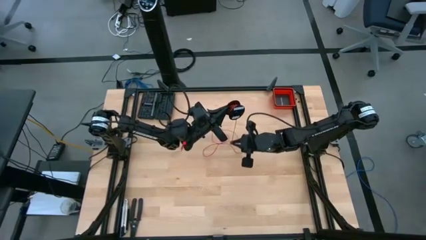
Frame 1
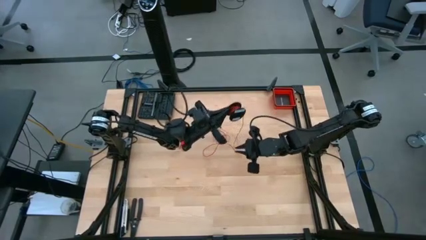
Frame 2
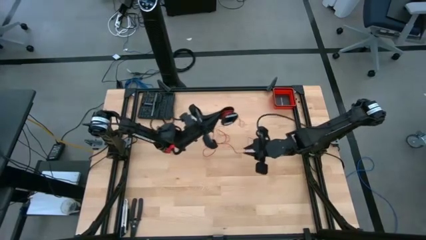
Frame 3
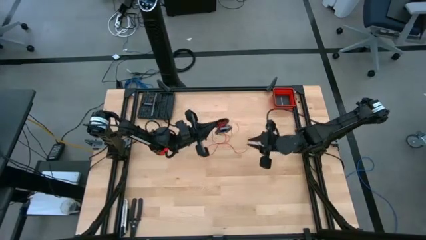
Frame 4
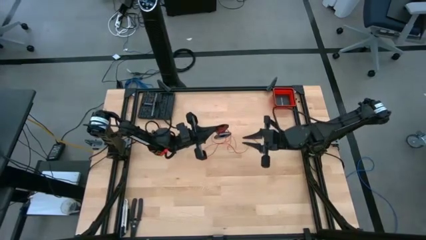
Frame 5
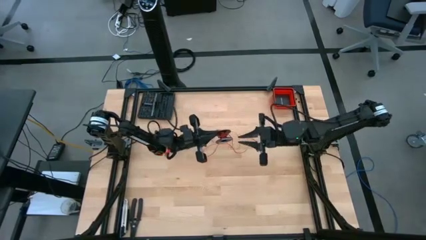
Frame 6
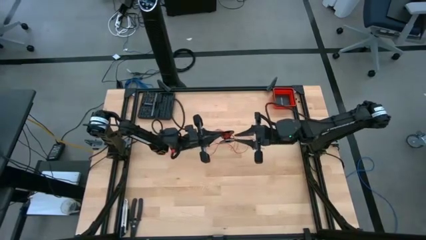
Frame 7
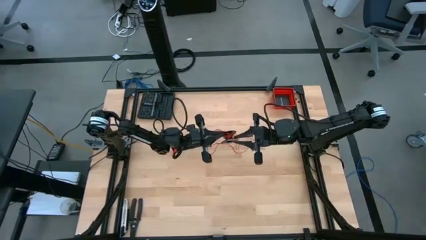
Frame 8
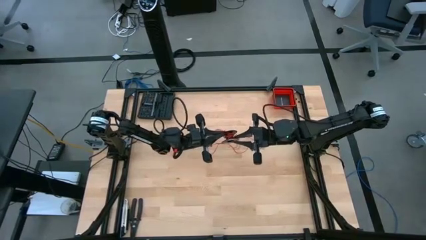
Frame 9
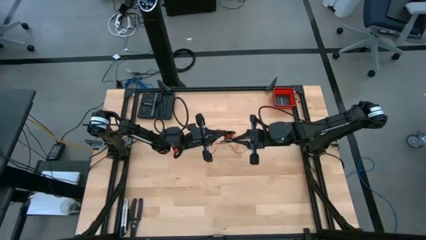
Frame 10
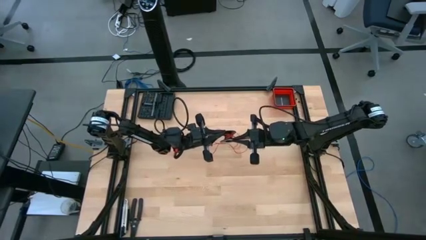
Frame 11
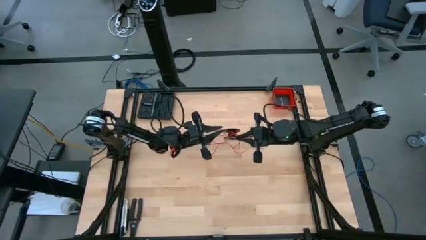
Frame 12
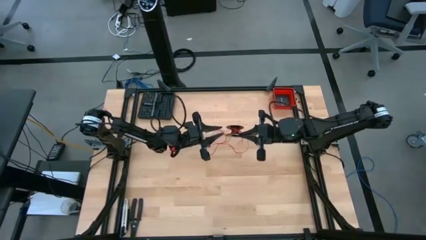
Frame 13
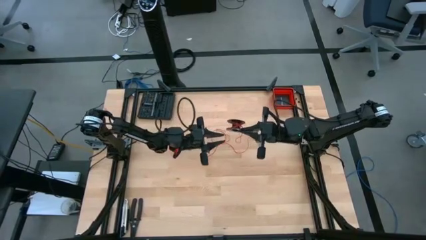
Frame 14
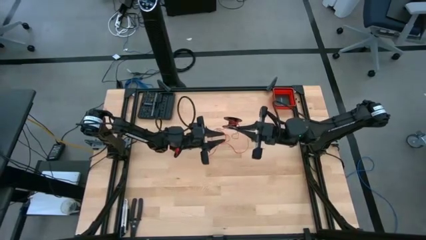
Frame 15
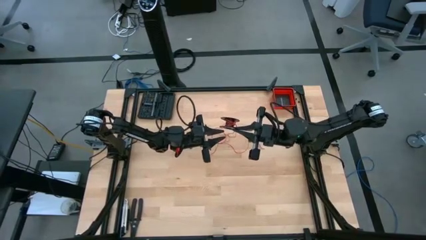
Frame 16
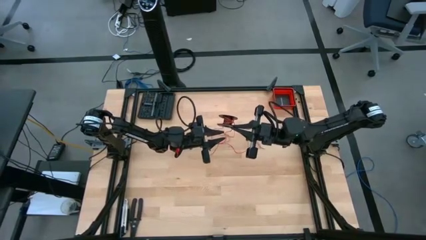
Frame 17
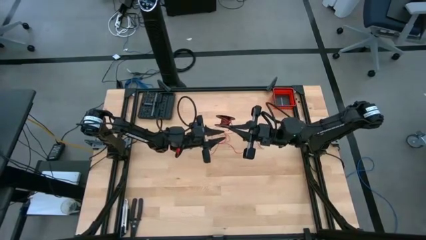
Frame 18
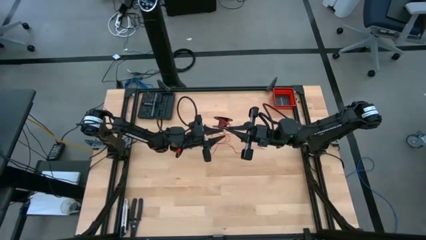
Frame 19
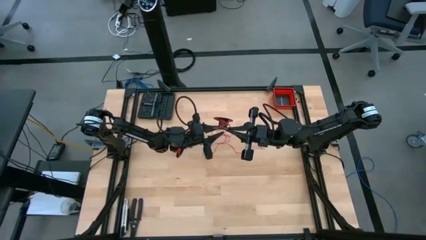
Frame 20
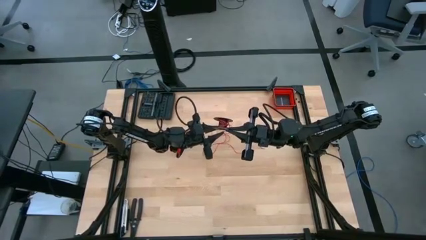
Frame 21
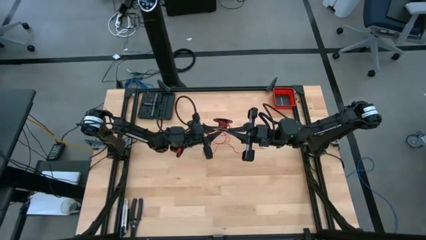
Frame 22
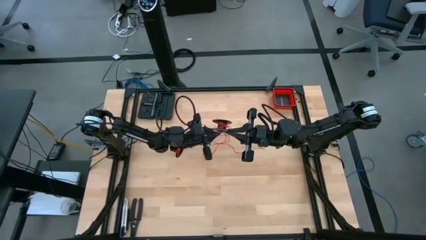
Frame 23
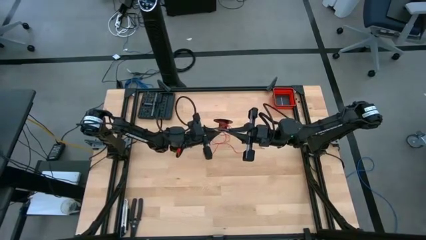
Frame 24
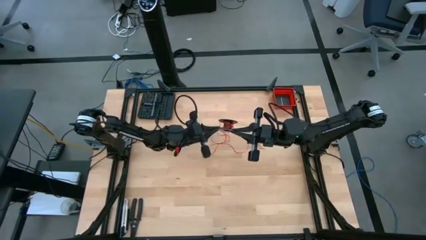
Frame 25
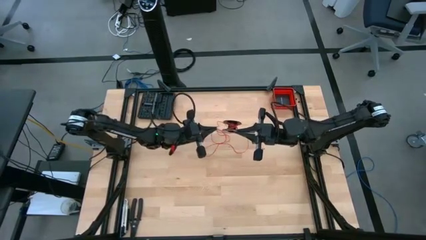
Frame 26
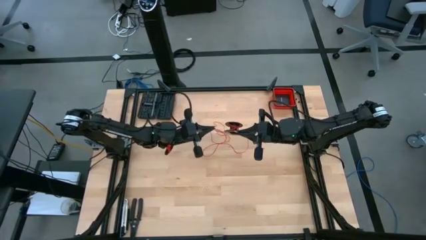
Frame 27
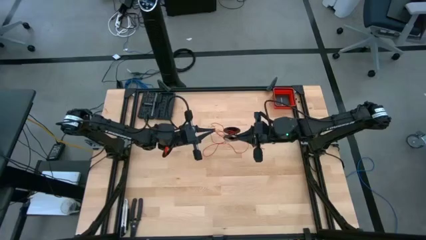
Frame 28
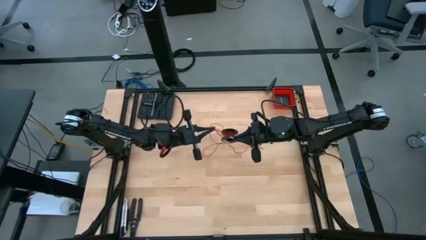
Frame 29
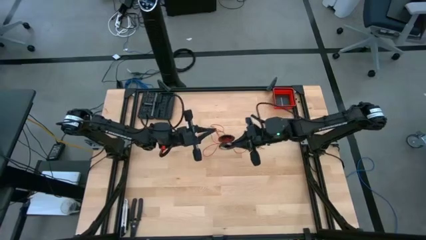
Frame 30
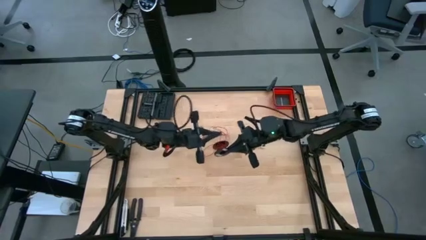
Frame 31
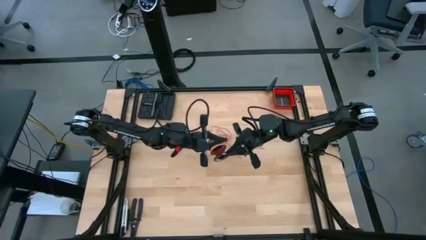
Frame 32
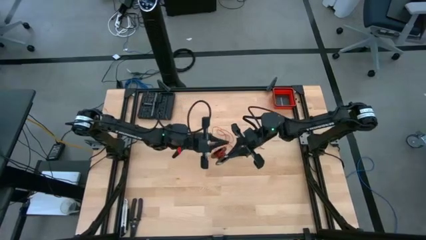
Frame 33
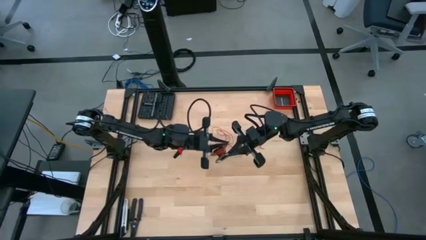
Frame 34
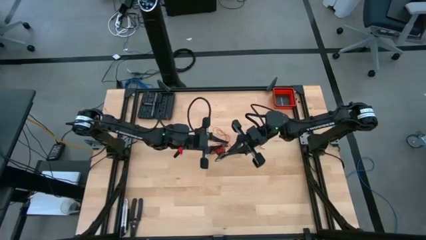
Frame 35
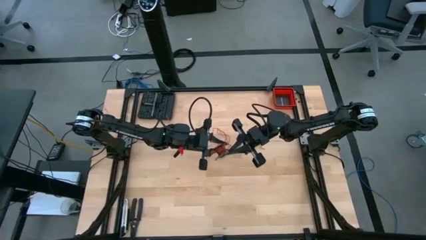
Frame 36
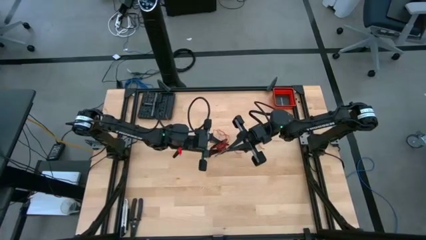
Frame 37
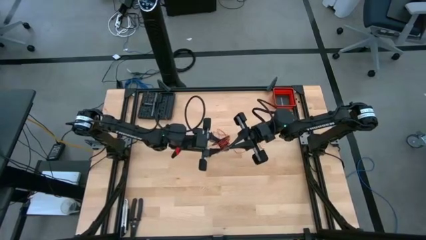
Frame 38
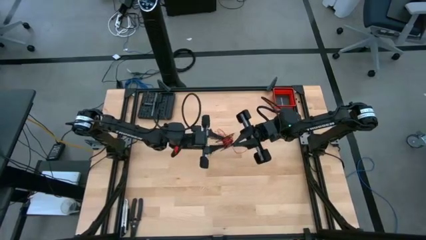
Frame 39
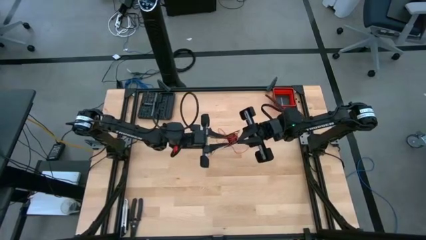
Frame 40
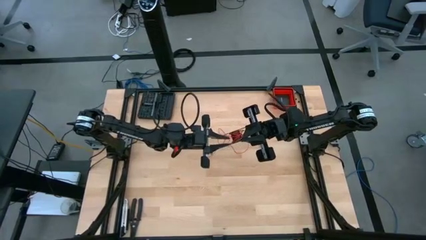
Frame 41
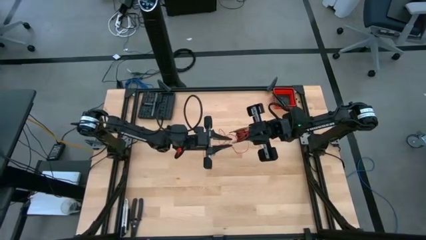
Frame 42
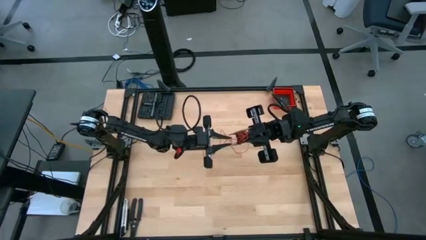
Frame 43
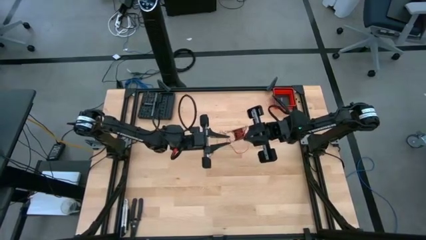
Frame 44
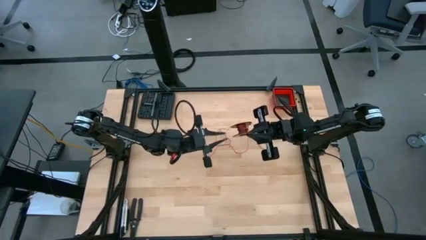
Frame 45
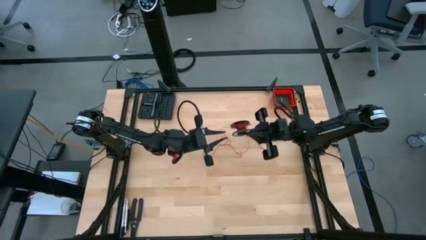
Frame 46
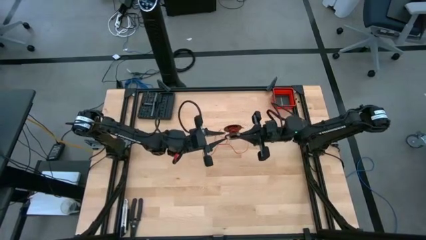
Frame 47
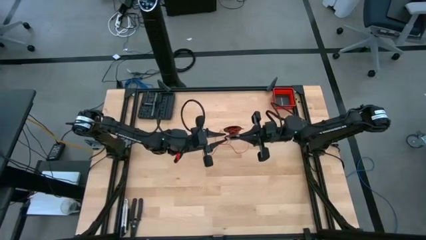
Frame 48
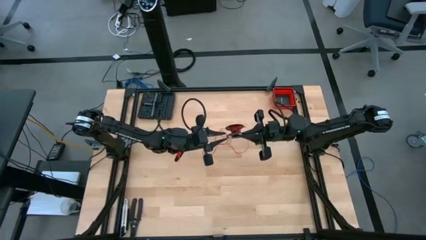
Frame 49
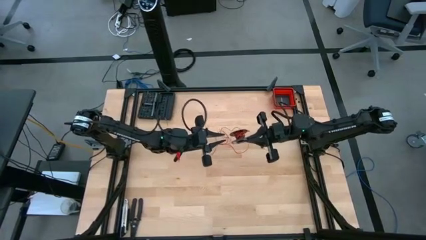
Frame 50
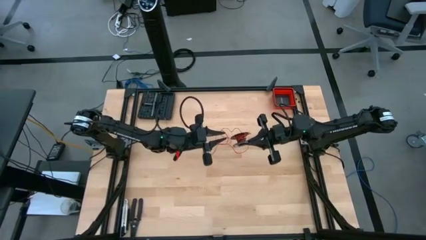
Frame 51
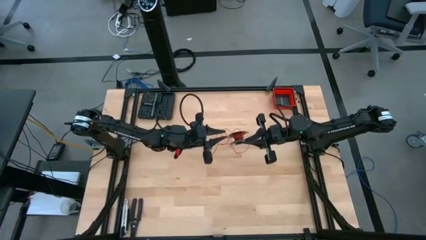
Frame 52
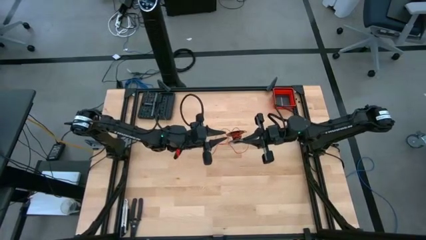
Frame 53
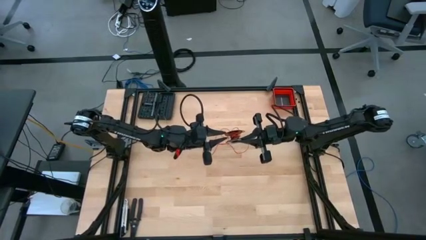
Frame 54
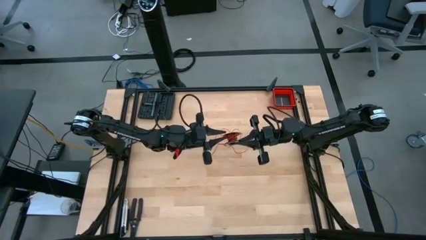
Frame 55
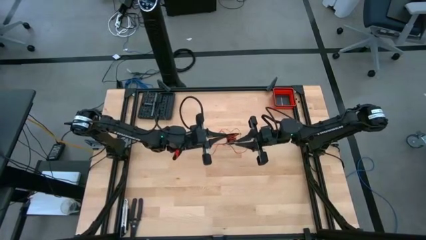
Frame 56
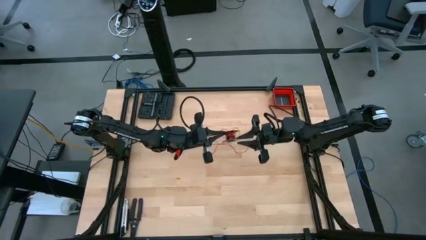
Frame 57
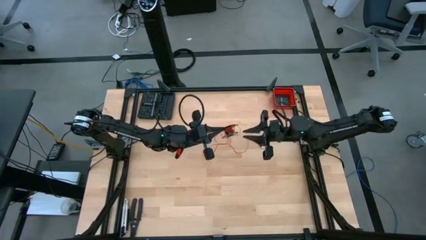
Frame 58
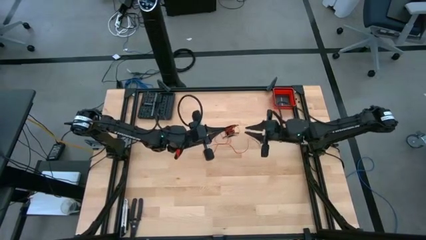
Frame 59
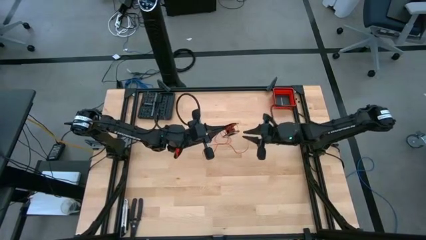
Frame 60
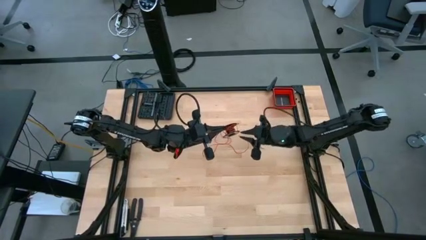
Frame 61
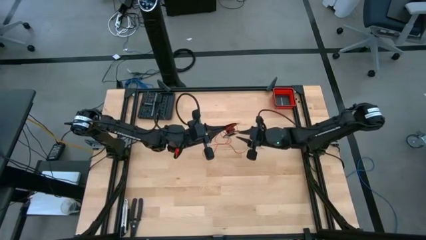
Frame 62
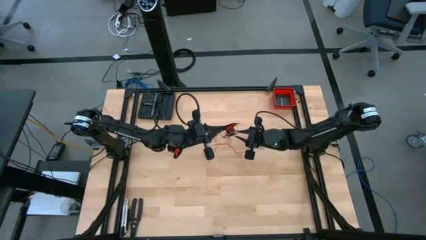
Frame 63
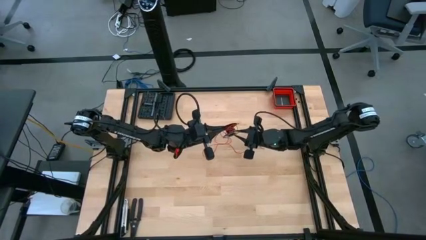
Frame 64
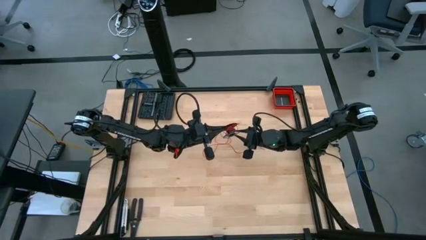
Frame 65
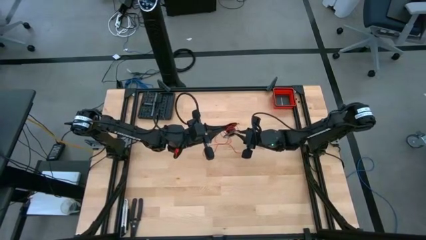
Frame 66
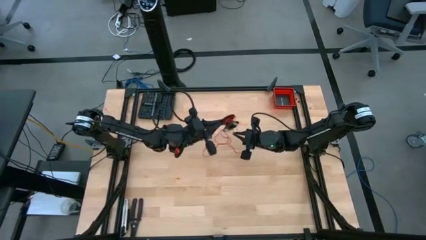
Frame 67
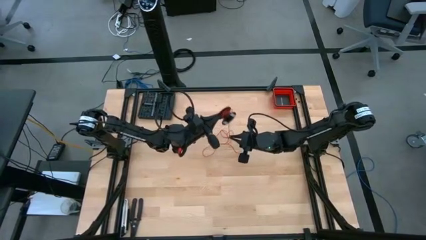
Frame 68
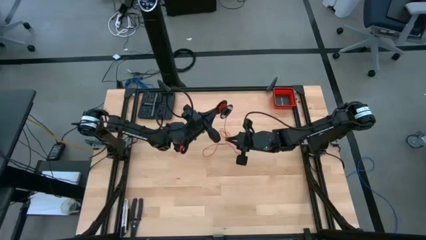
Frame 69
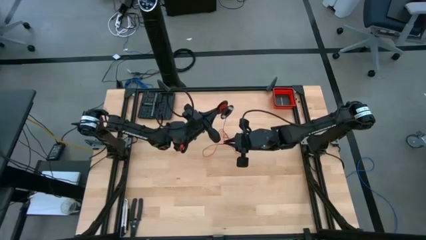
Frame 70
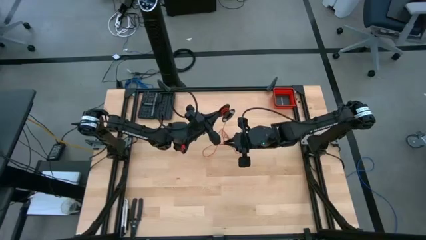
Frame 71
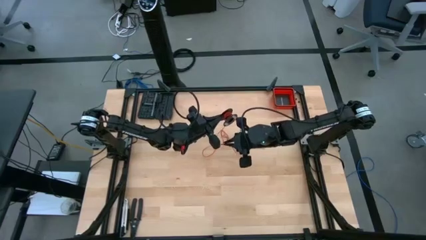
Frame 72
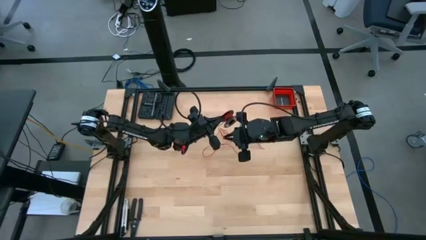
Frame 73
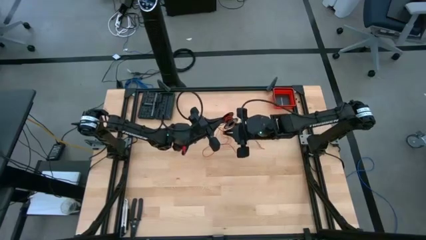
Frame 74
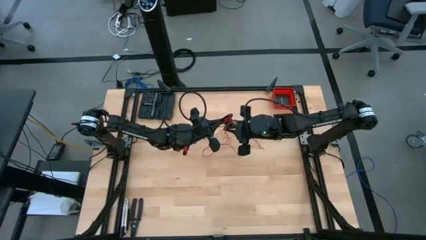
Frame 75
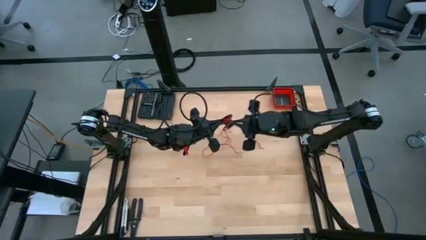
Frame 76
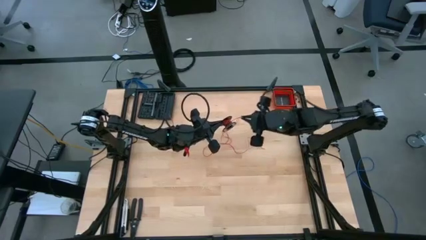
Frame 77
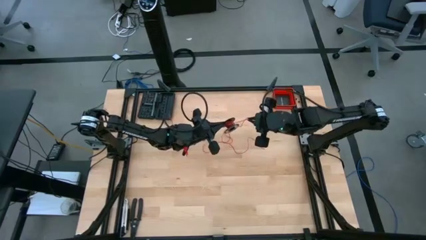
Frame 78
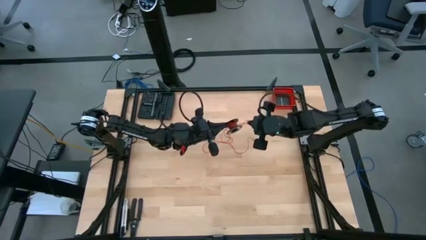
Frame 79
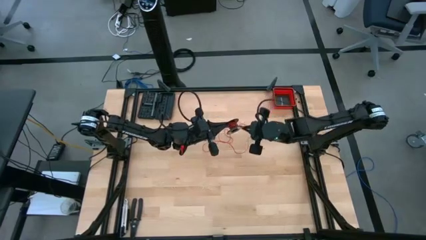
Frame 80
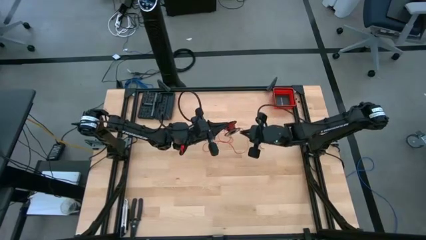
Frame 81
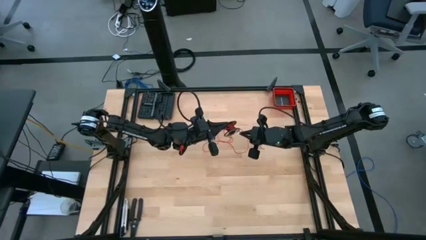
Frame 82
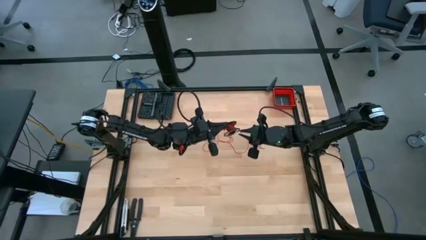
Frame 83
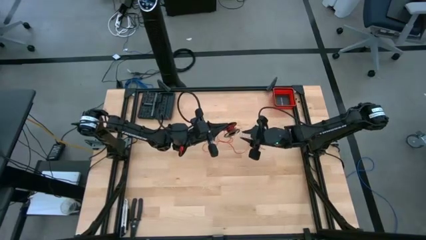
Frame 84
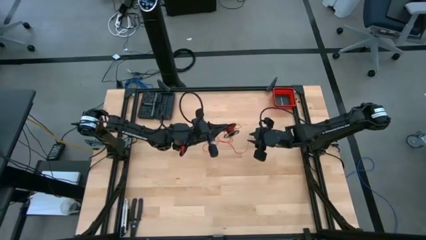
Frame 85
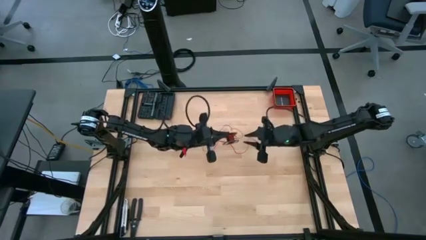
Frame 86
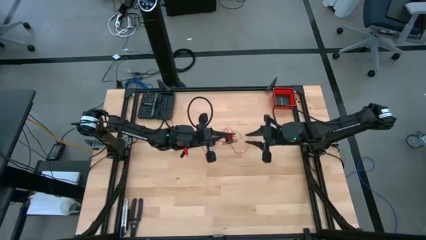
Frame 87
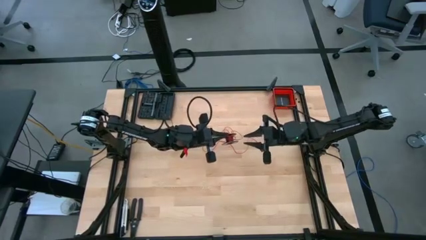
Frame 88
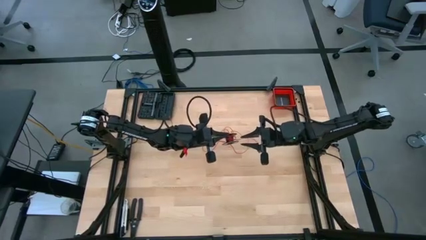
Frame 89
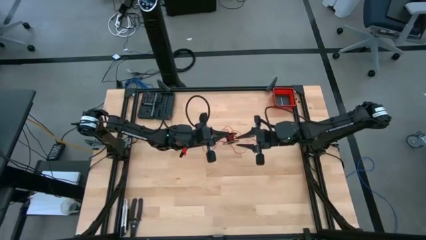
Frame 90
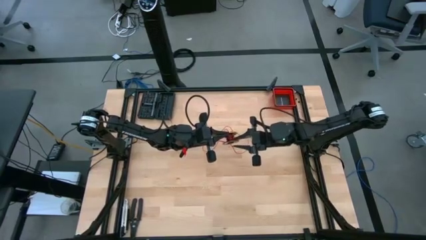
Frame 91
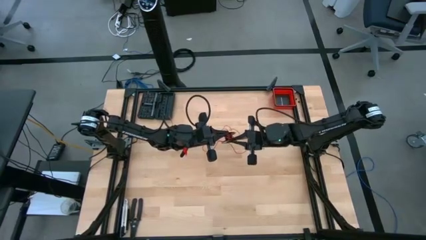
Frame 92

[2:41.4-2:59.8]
Task: Coil cords
Coil the red wire on the black spool
